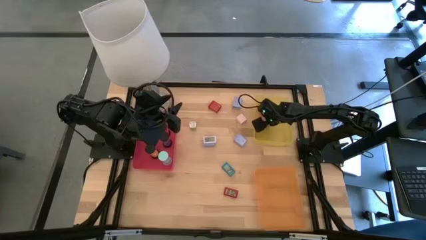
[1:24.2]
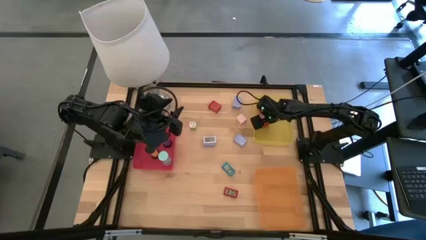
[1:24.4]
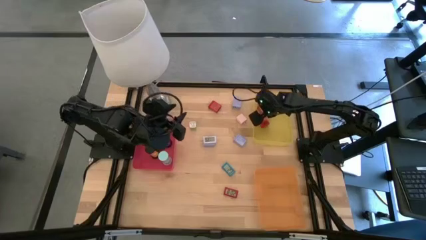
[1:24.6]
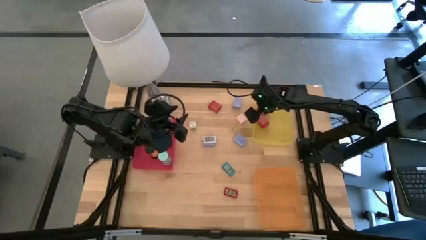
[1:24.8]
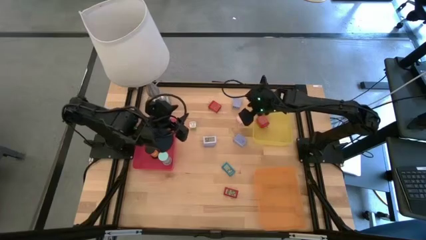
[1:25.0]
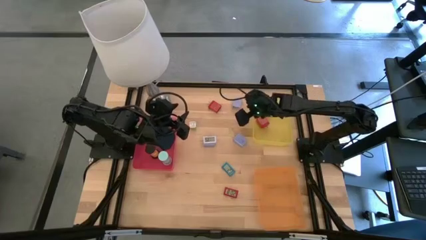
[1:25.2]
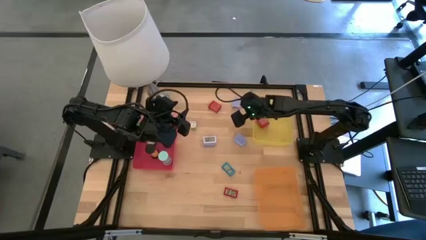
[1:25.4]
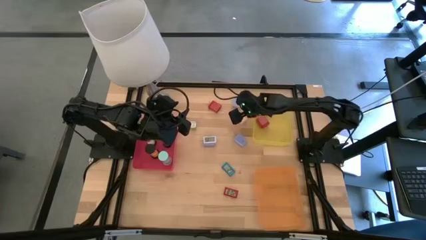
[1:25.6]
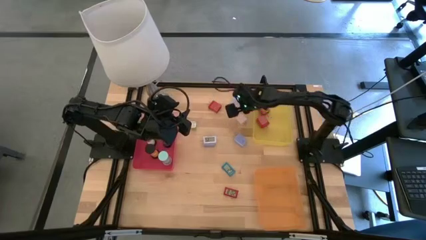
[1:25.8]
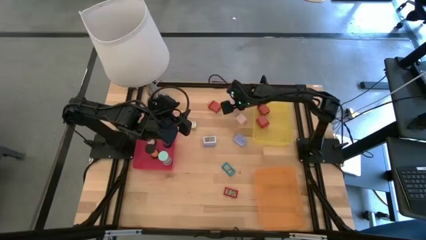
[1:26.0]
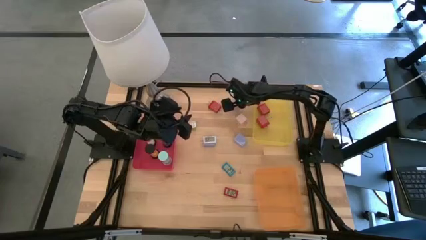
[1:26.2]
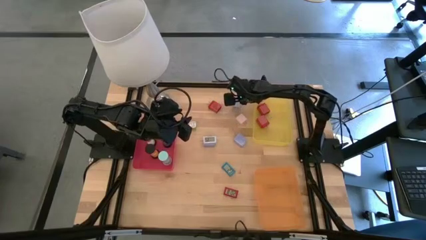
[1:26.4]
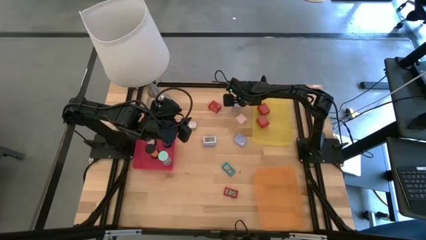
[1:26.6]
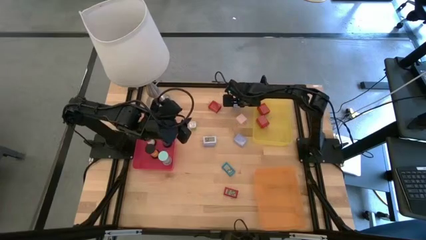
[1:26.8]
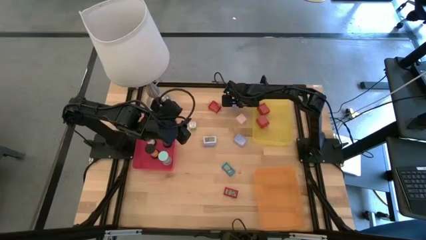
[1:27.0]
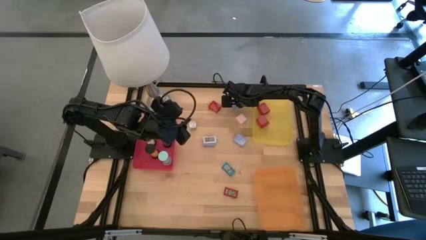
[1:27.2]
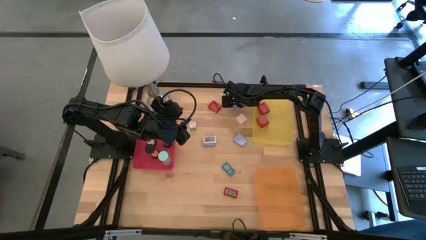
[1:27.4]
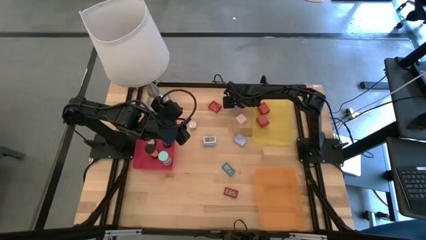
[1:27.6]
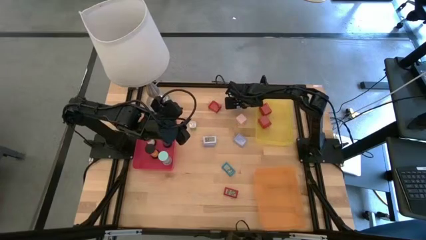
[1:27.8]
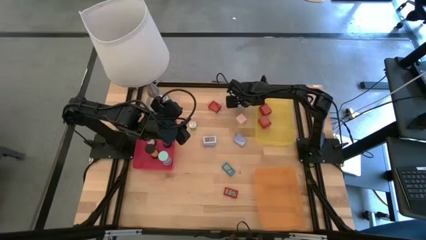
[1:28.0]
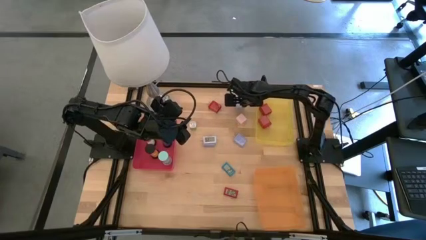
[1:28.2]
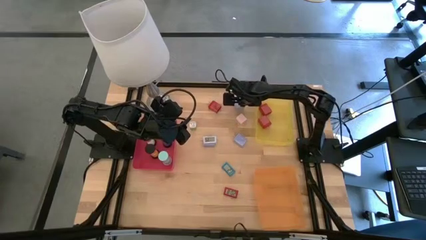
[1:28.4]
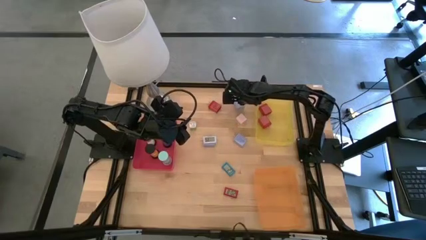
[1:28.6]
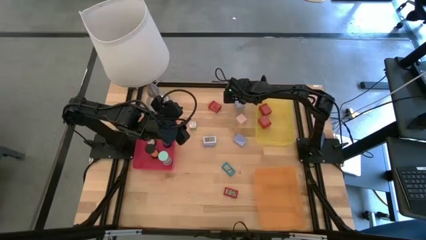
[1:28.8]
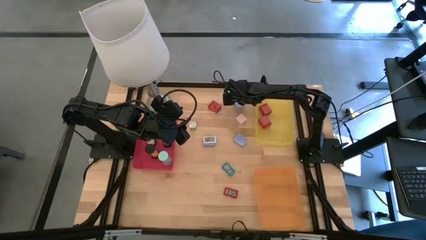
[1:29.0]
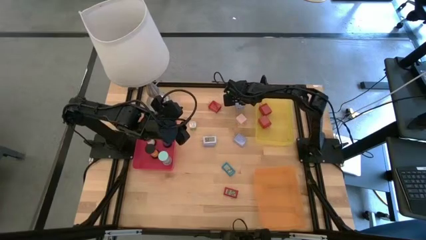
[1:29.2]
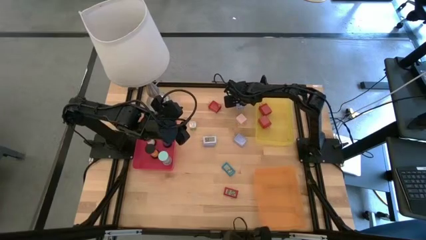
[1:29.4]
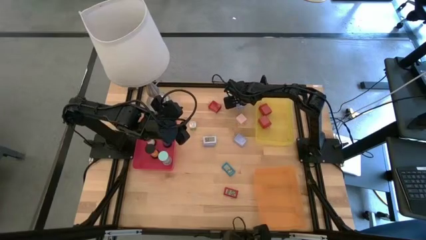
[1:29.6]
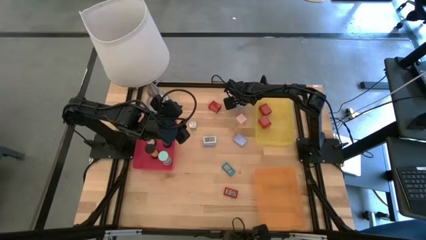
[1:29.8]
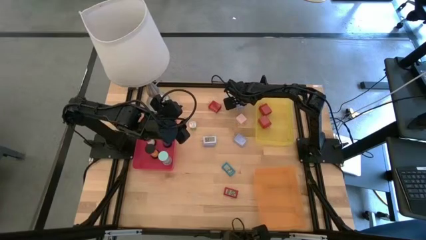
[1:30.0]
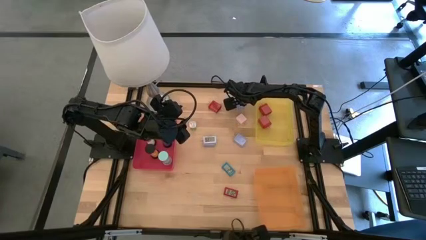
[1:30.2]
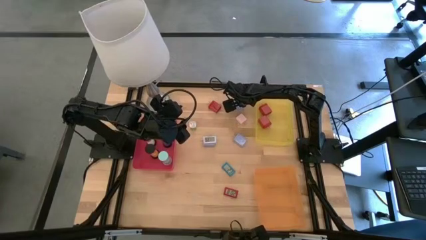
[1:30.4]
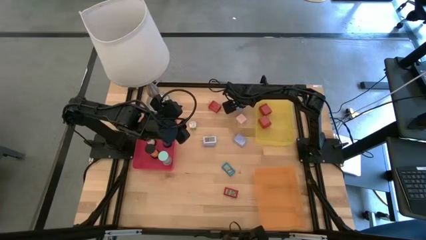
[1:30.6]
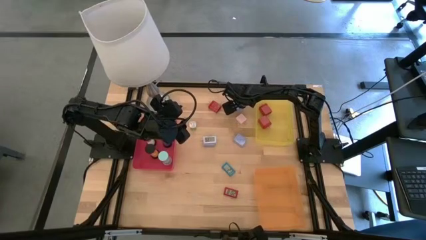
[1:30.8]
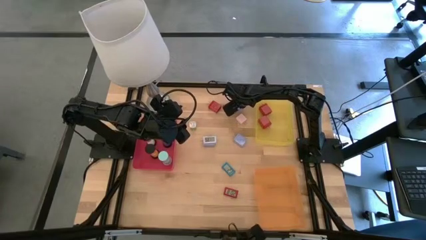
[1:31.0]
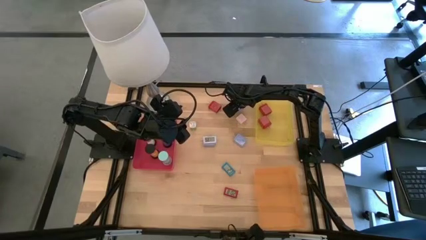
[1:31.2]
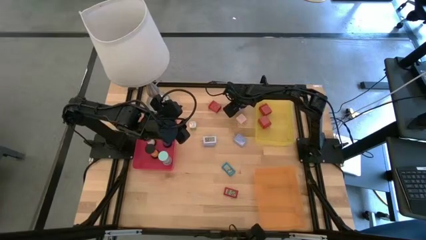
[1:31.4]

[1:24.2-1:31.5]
Task: Pick & Place Office items
Put the top blue charger adapter into the yellow bin

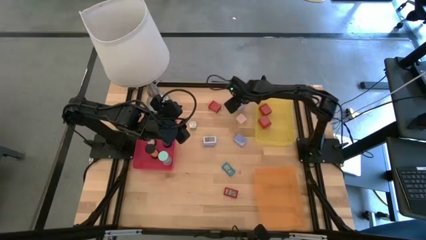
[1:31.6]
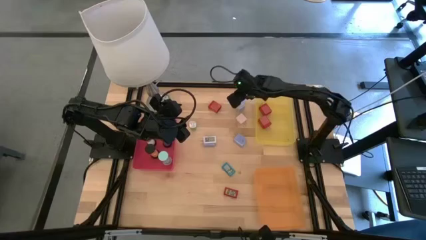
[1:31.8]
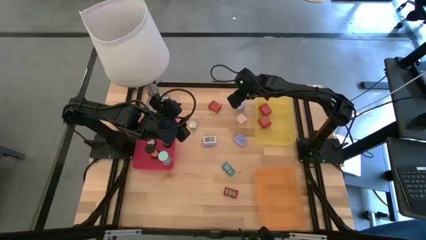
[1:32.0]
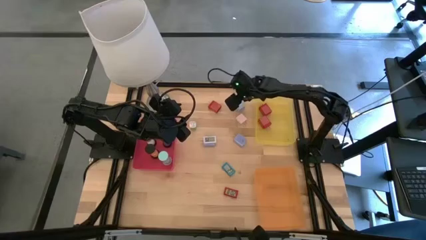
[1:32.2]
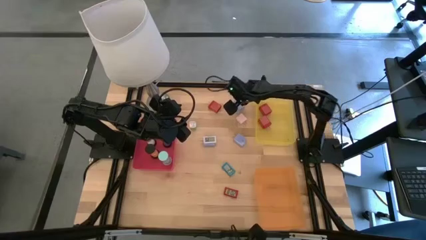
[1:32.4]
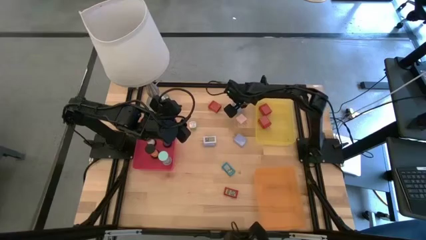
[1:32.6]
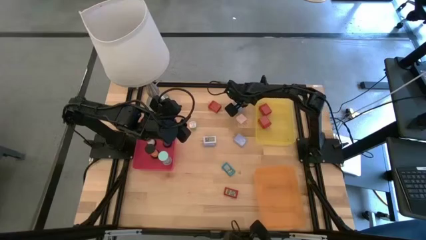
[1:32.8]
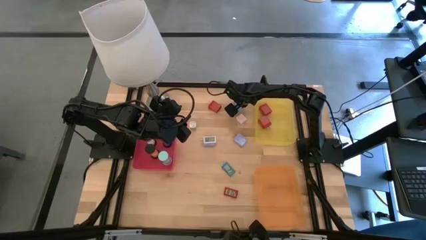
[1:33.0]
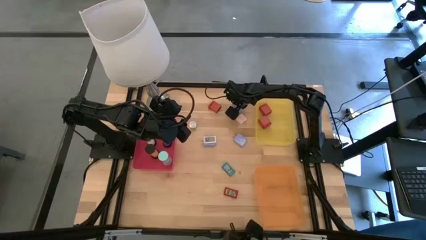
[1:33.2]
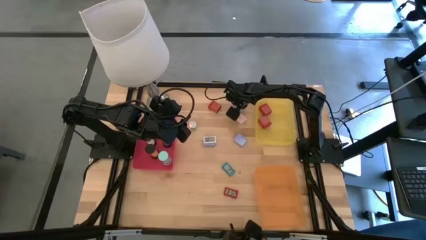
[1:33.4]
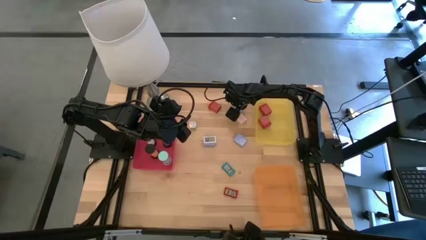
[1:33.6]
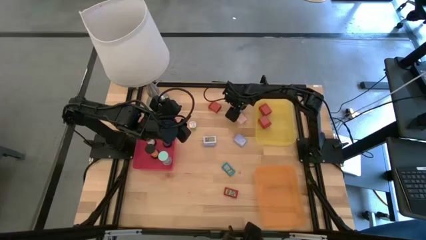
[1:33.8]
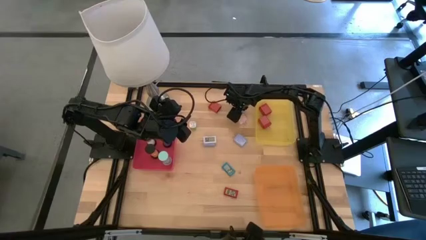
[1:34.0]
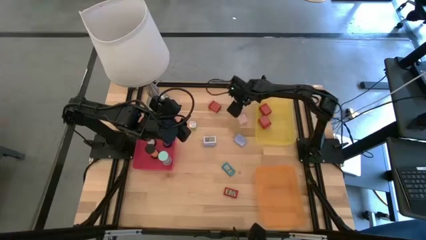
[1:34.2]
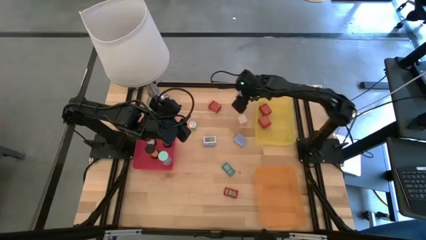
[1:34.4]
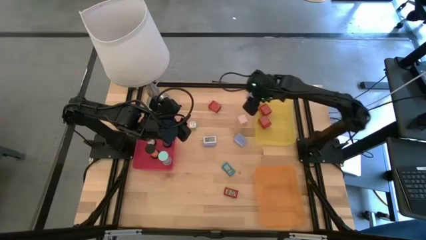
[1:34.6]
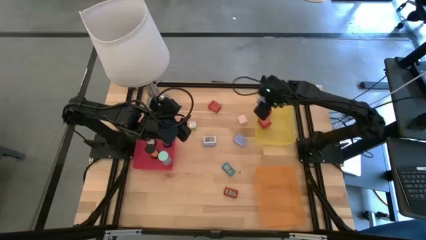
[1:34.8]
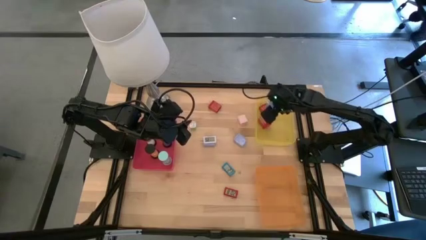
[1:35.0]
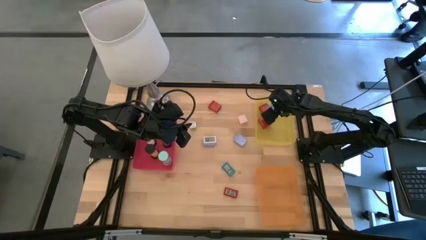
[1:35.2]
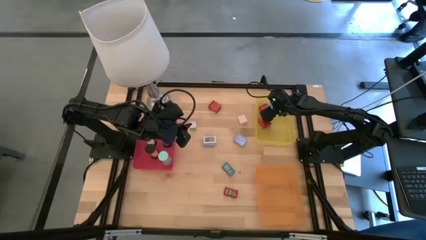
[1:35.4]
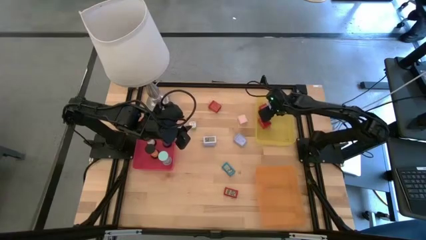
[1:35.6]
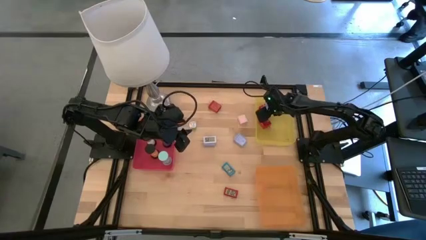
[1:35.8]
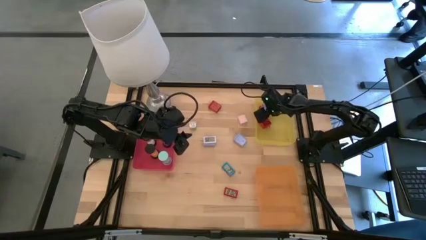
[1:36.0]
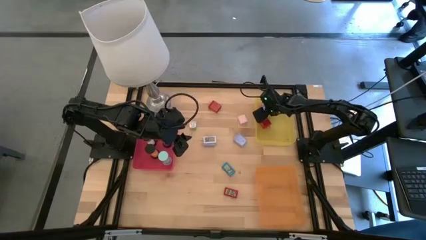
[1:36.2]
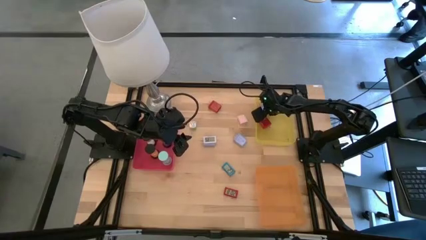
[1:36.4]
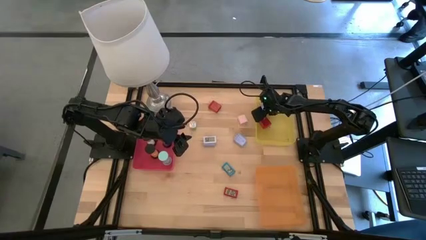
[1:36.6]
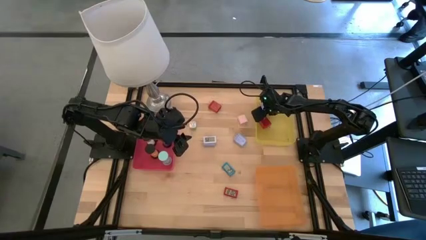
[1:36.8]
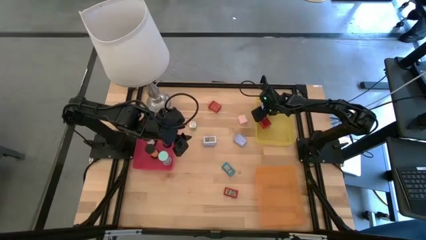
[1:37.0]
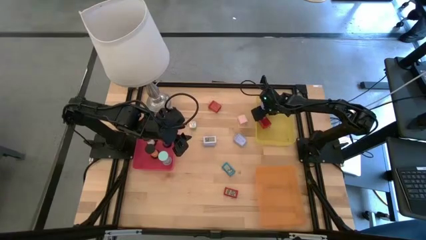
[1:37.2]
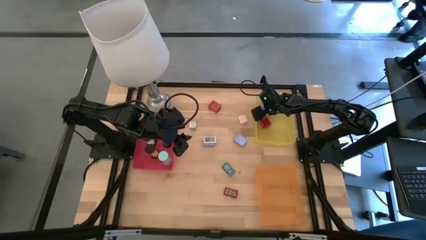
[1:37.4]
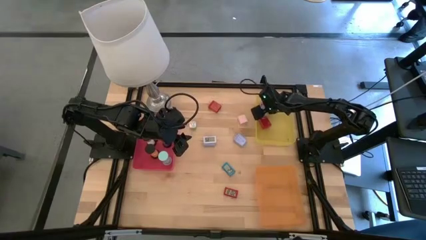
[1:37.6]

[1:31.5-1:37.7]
Put the top blue charger adapter into the yellow bin
